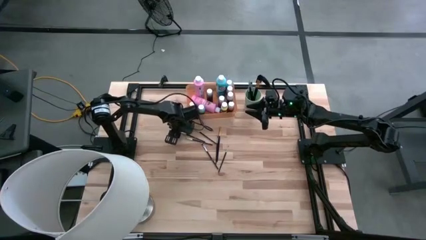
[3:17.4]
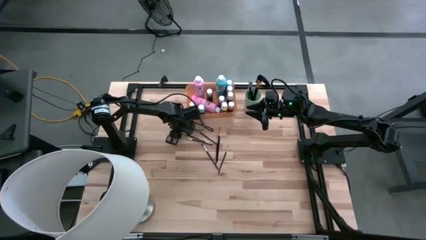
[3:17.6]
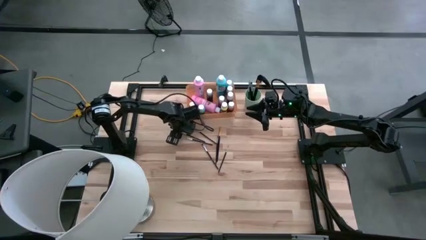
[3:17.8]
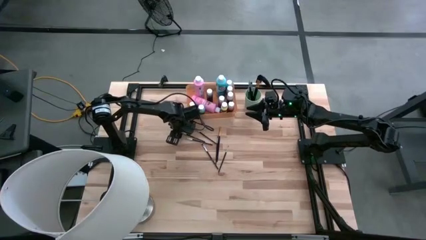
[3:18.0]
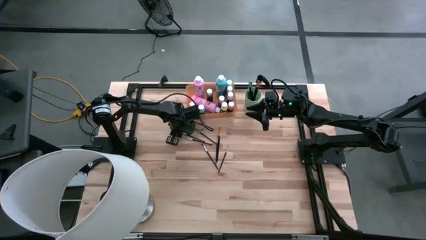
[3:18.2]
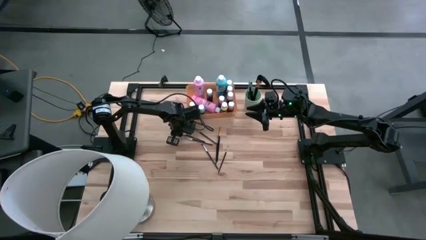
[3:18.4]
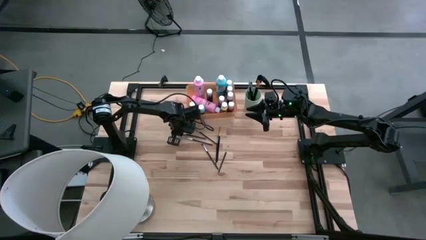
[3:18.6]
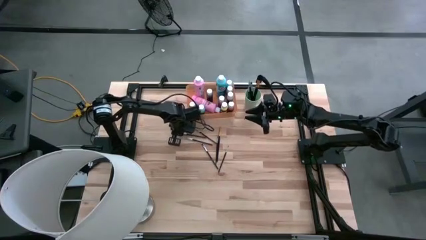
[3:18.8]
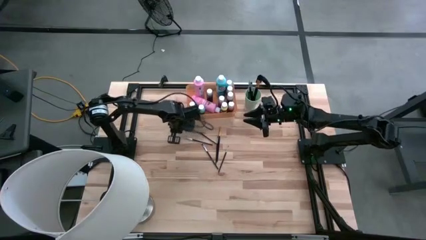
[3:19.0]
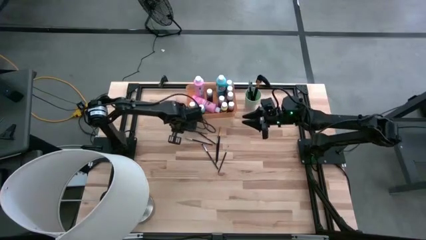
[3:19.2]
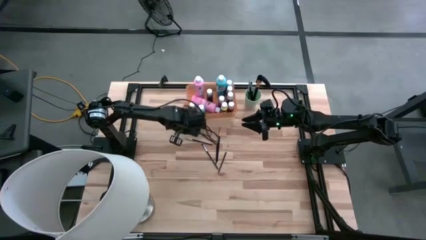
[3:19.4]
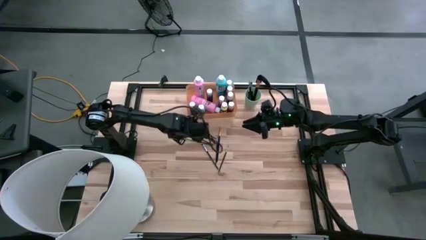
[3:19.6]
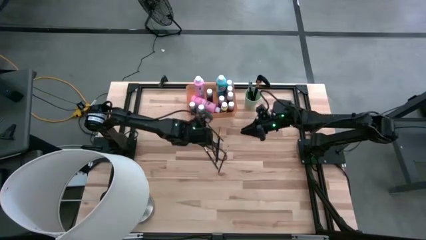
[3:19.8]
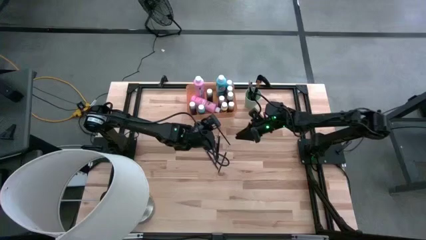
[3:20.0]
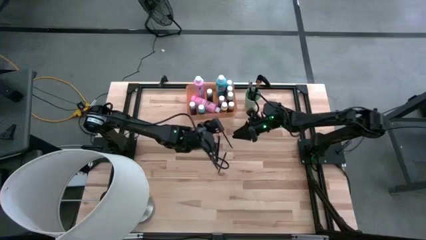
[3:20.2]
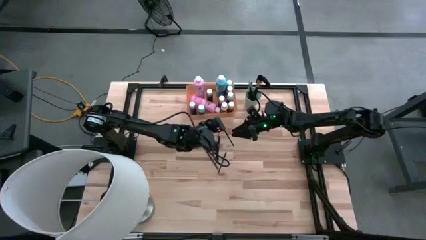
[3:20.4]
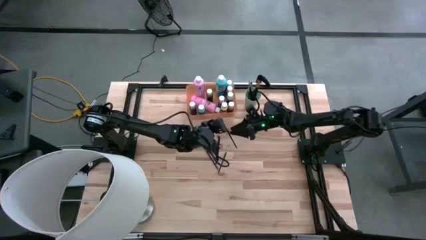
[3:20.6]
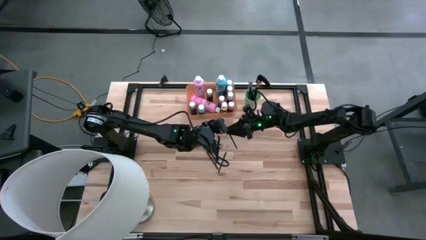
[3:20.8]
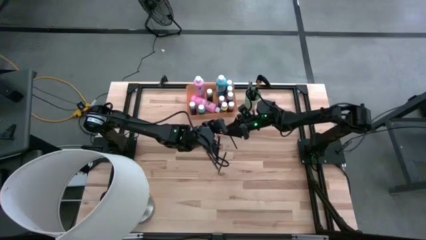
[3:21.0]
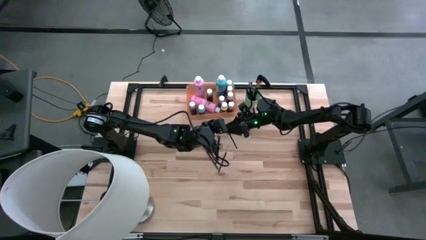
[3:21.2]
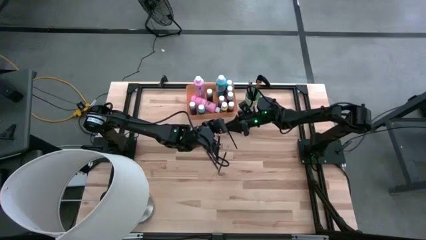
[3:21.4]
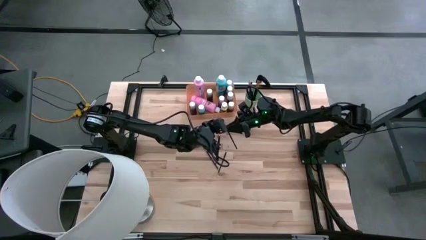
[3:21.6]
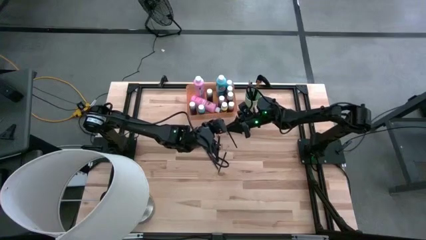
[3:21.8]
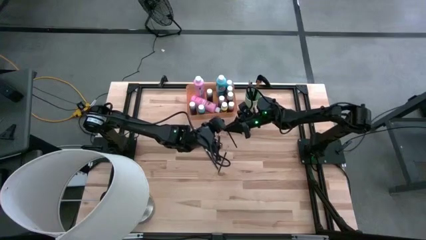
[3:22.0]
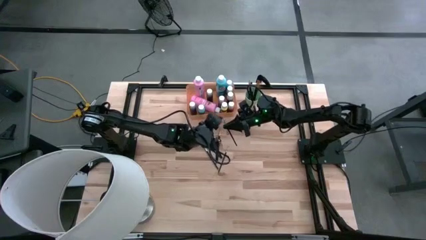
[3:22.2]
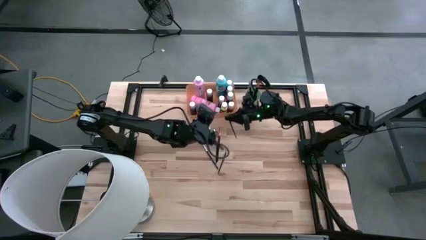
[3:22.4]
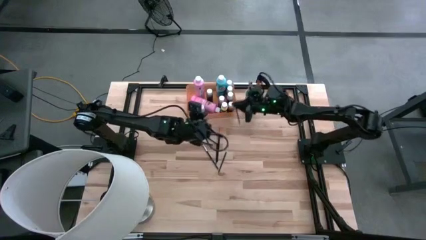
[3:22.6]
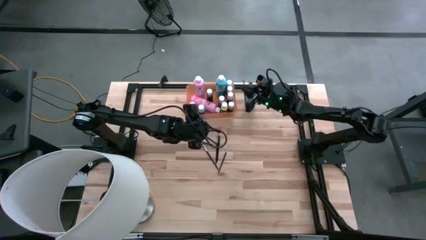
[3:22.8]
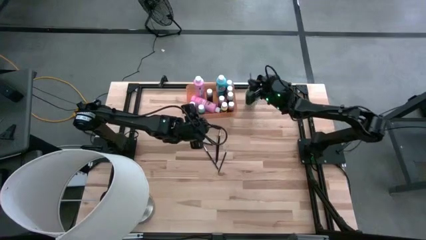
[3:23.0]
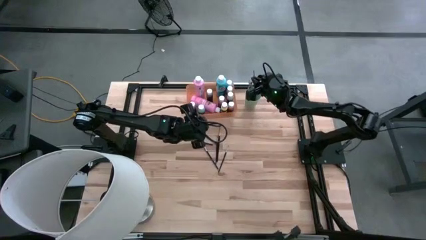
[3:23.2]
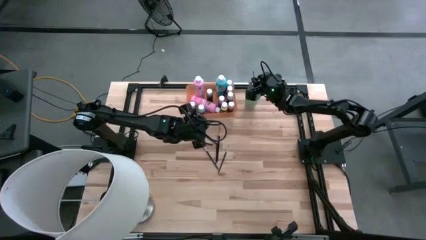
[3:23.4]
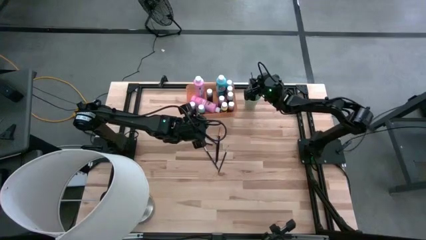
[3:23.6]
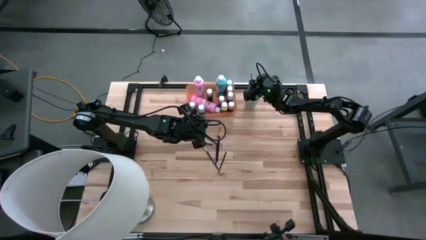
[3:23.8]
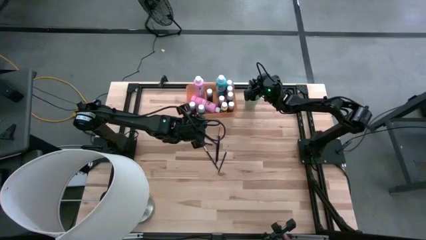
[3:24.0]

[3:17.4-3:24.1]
Task: Pick & Place Paint Supplies
Put the silver paint brush into the green cup

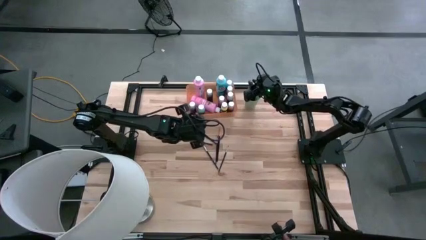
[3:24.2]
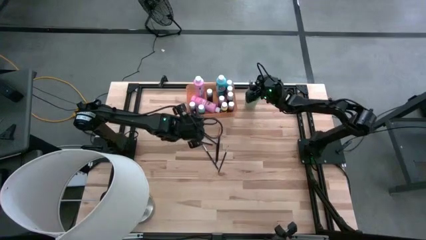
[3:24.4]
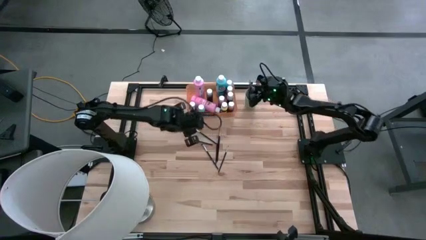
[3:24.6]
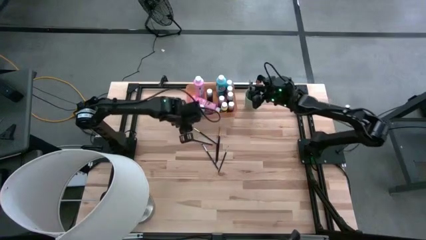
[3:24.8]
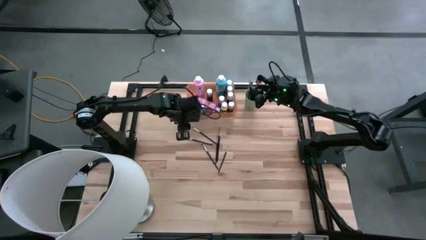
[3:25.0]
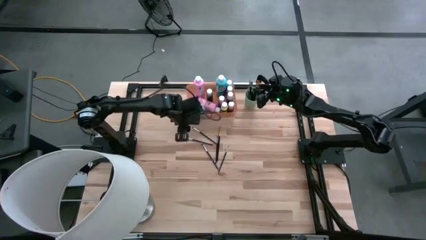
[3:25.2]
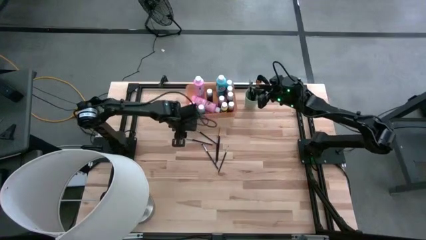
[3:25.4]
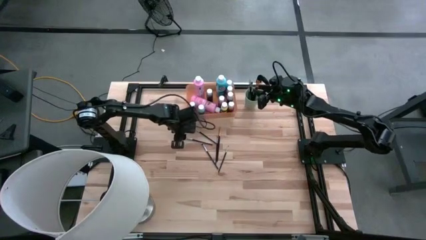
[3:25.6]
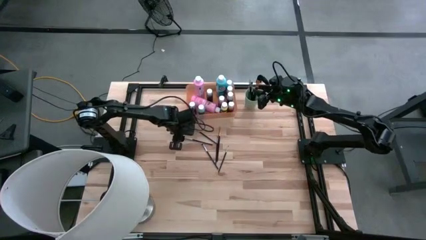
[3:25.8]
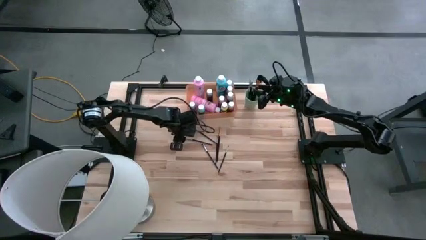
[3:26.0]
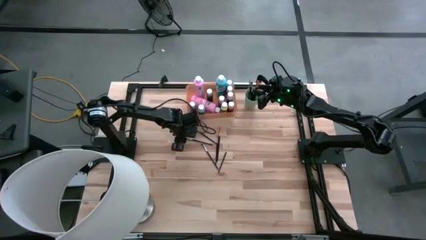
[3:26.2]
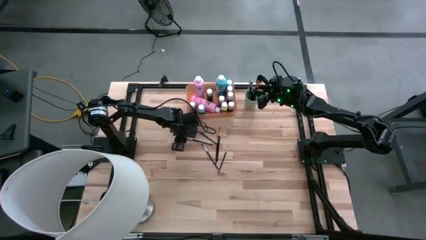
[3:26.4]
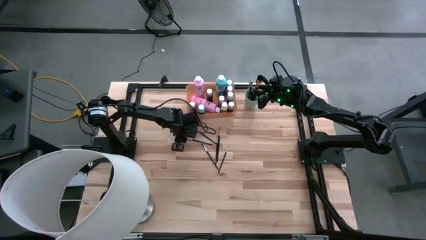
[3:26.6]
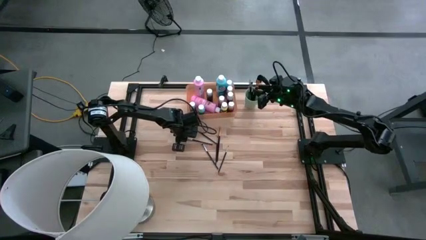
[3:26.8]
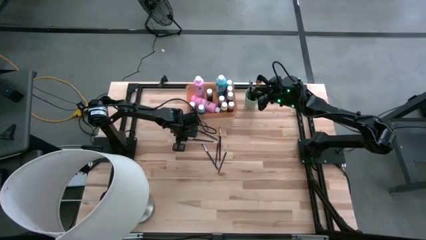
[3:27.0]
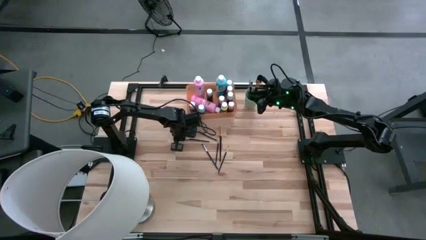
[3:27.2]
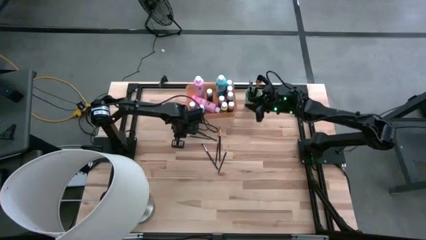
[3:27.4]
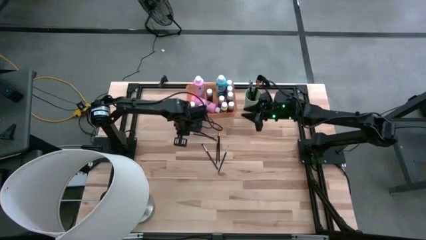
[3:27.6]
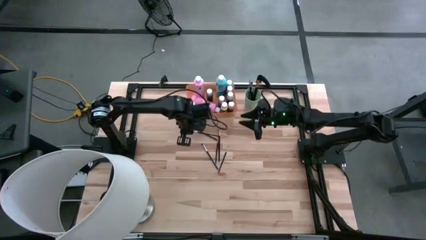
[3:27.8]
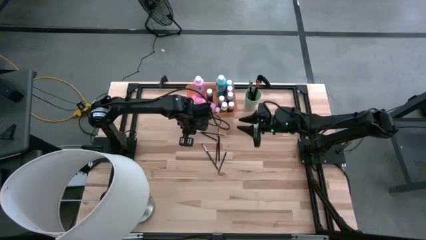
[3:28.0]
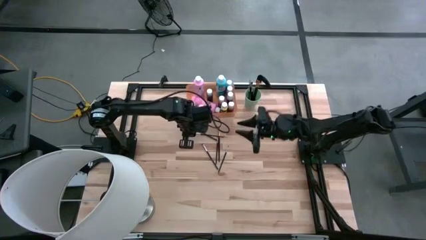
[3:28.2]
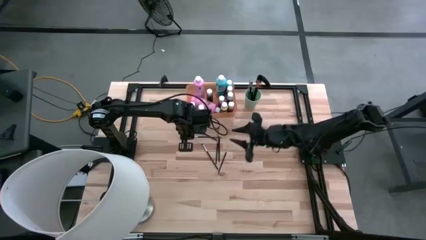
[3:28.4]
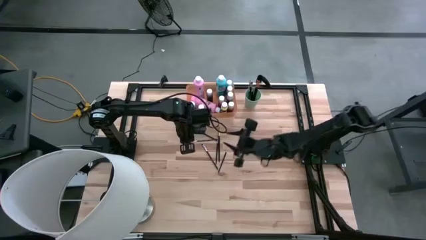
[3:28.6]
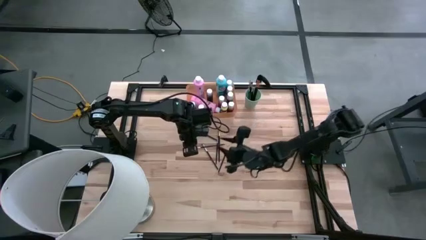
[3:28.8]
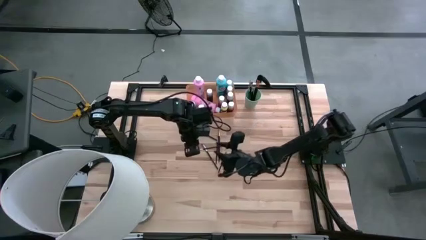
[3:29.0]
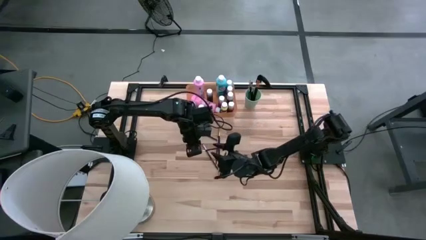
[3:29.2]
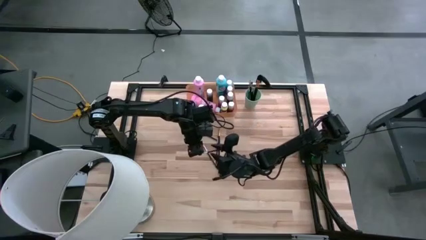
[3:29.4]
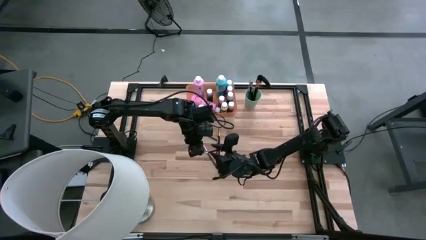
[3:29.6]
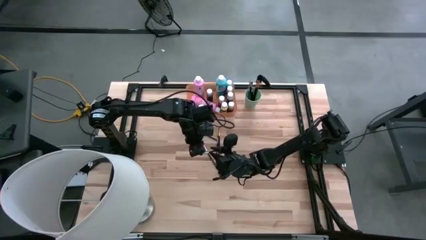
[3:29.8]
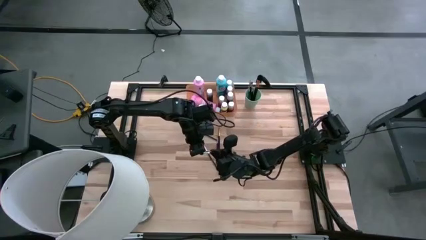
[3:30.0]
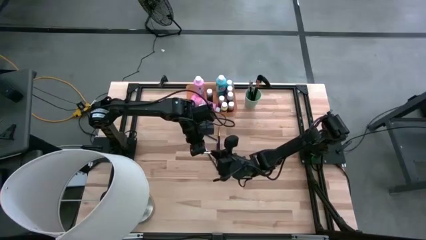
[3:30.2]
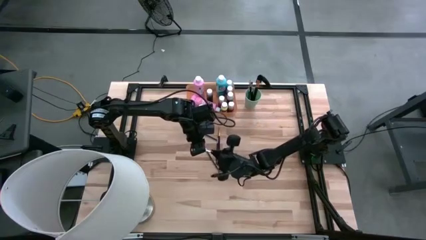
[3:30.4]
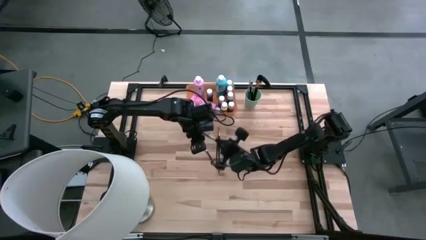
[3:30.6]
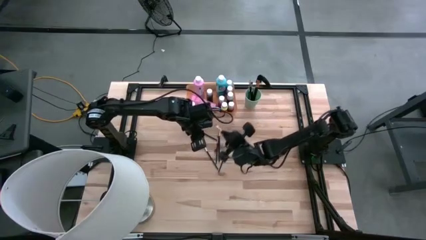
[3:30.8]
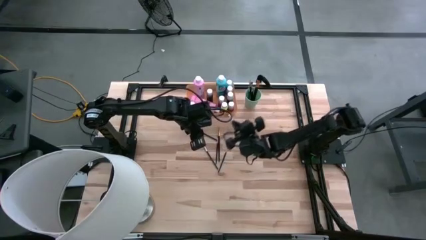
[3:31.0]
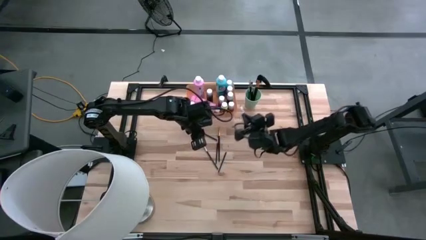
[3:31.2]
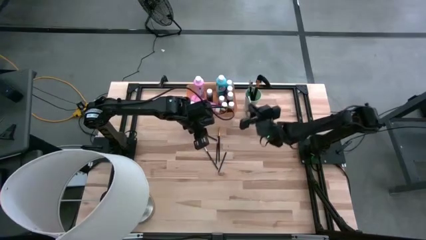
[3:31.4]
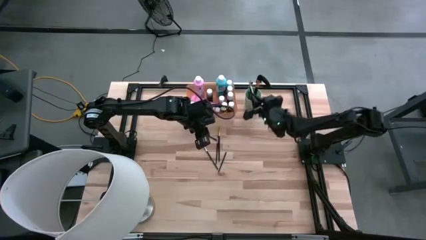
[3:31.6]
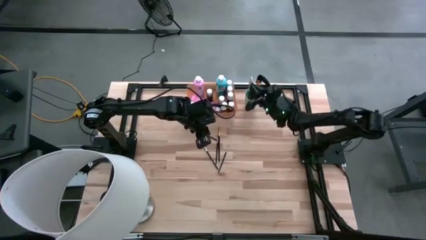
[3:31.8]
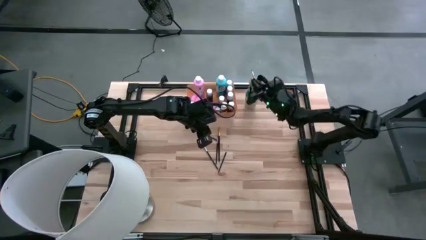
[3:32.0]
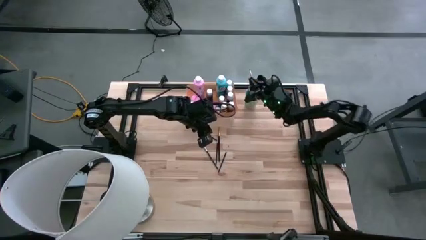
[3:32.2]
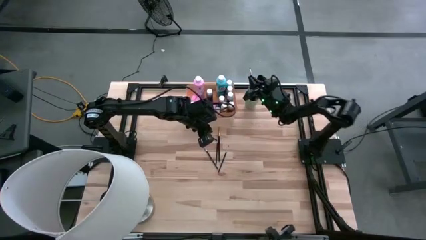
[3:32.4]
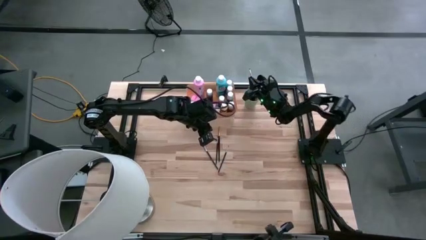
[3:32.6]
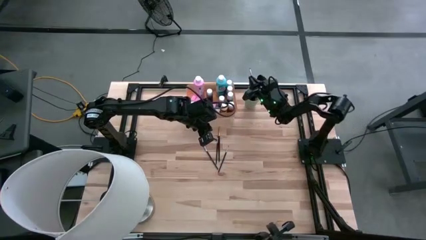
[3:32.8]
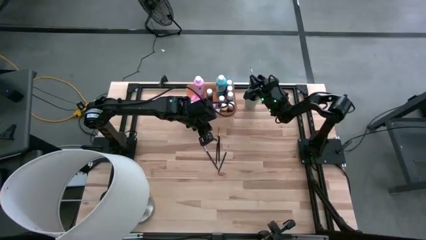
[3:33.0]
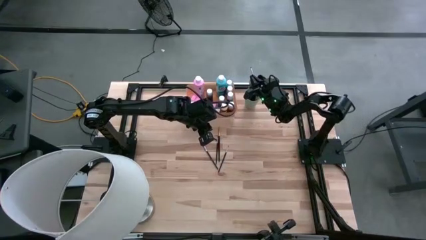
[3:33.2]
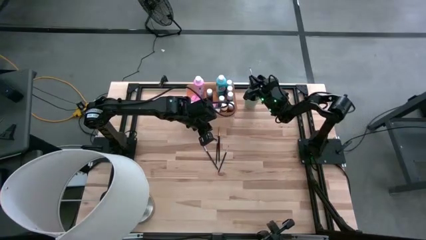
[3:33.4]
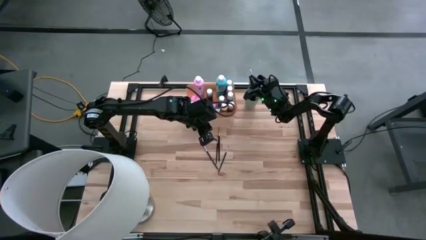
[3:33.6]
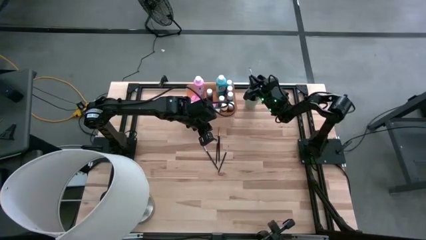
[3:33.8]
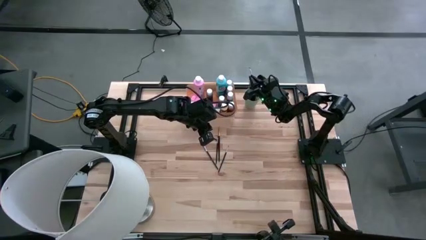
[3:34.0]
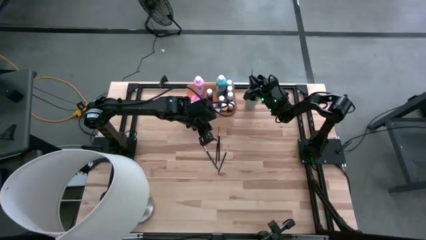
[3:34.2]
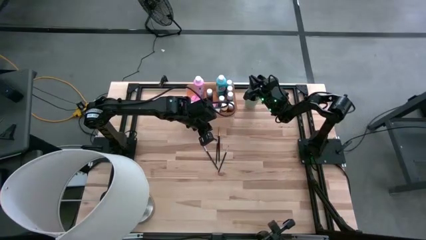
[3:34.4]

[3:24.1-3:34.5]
Put the silver paint brush into the green cup
